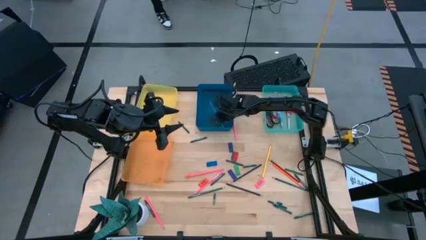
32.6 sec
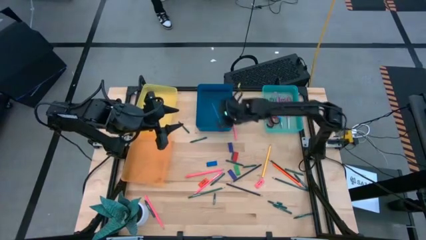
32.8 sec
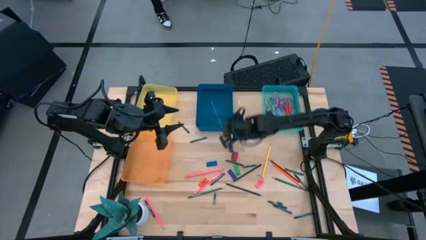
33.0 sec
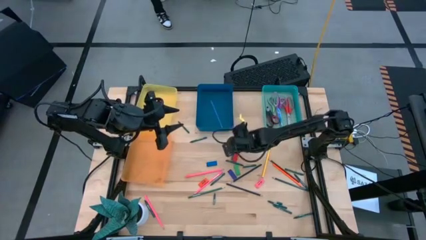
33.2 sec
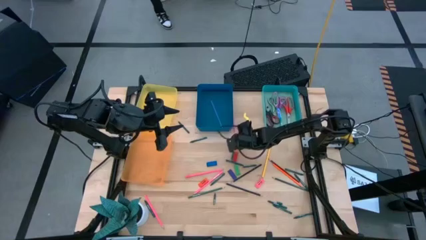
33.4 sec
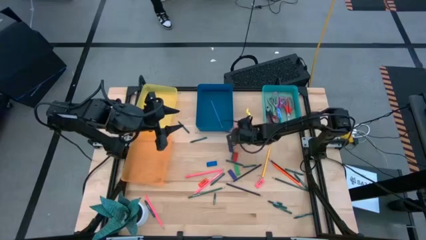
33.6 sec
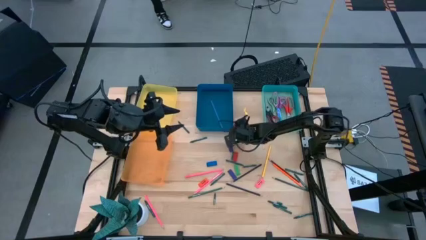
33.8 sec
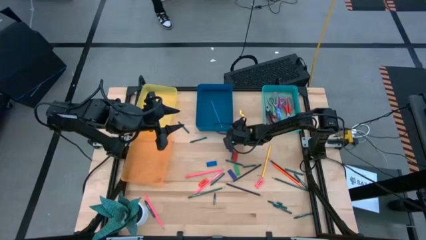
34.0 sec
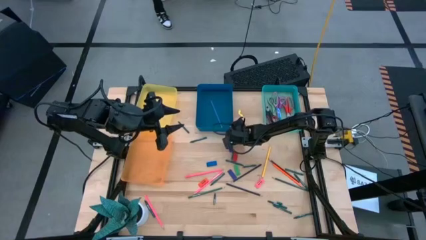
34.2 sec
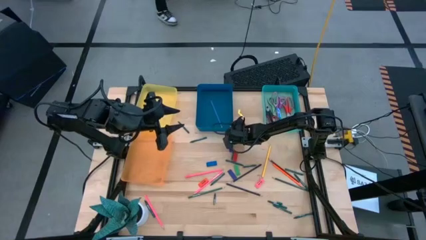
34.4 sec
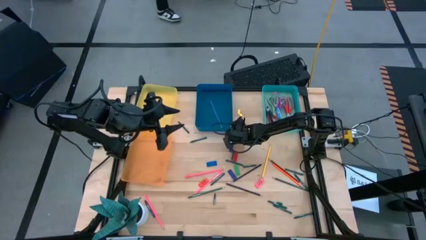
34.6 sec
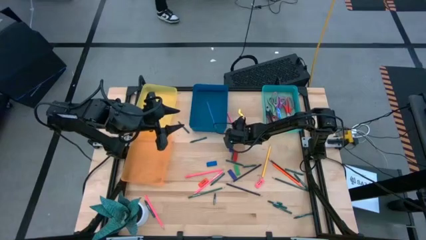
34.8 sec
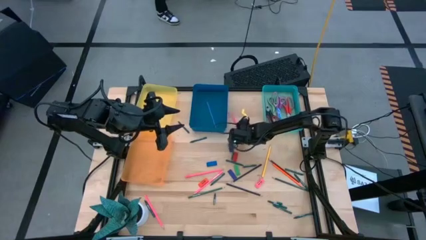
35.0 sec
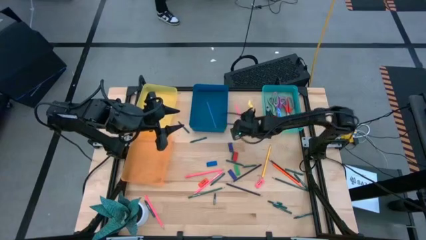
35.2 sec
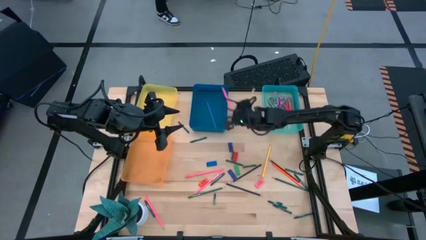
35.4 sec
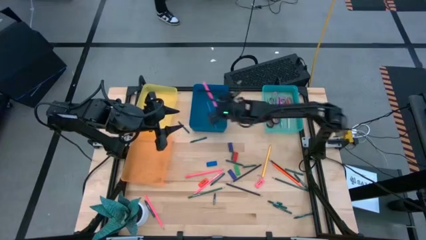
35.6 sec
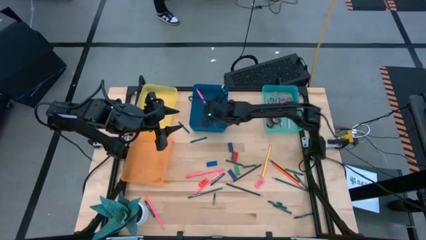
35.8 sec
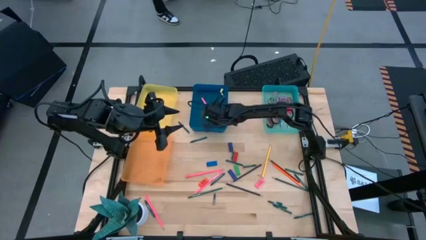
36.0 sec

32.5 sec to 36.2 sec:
Task: Sort crayons/erasers/pens/pencils in bins
Put the top pink pencil into the blue bin

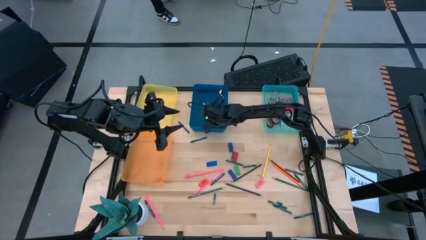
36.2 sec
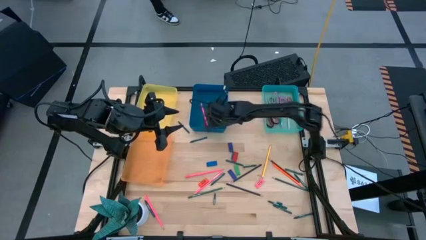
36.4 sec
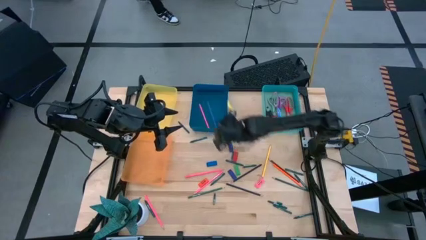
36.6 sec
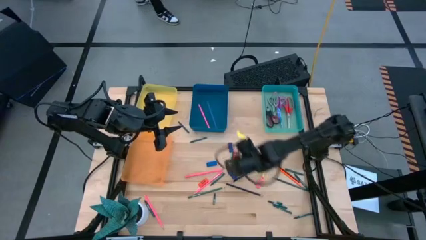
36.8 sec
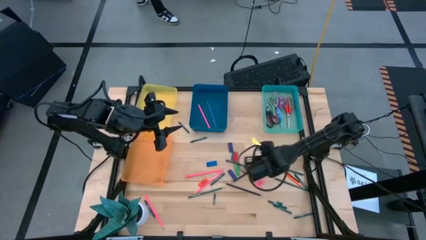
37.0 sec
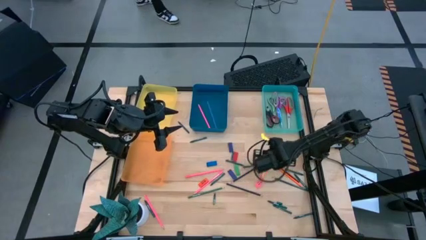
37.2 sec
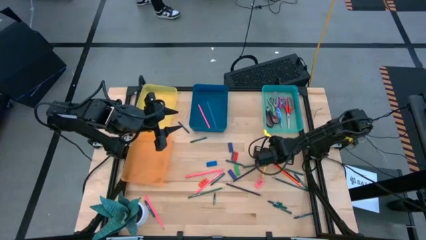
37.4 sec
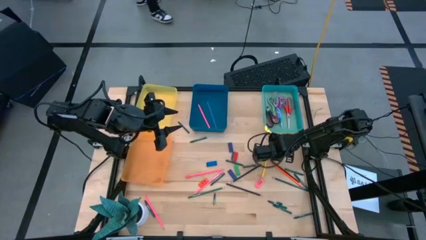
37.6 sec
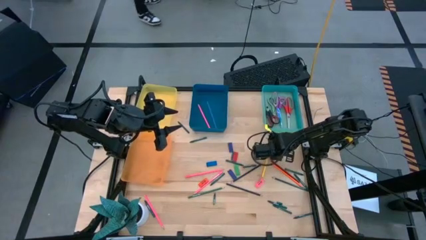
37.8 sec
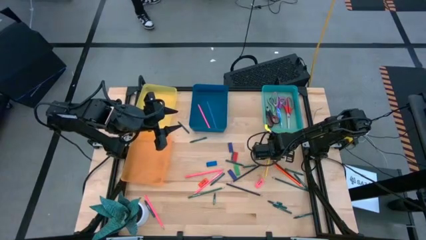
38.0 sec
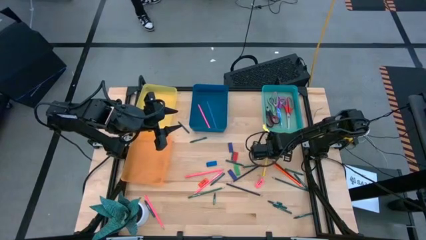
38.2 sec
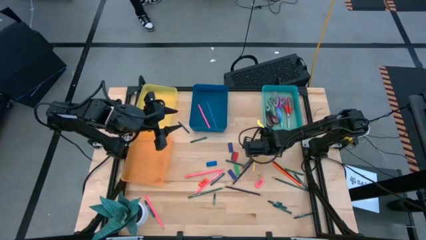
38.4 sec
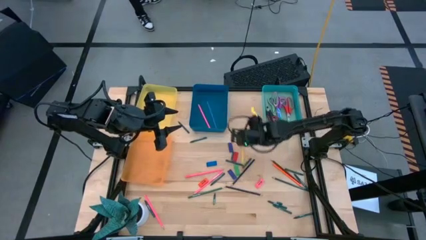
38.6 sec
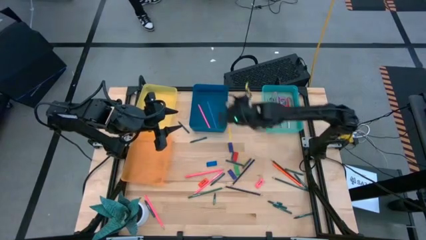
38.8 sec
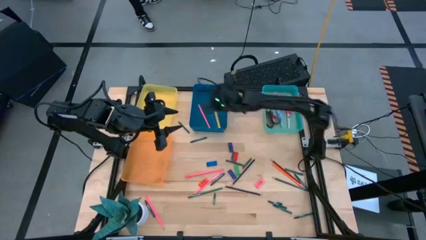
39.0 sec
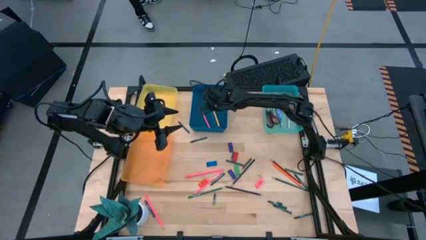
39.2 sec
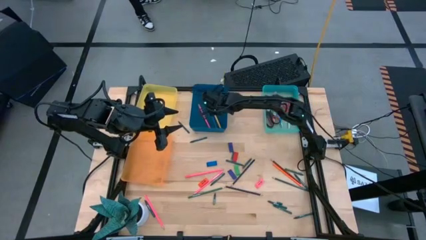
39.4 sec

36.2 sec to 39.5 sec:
Put the yellow pencil into the blue bin

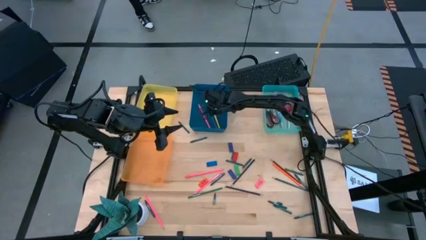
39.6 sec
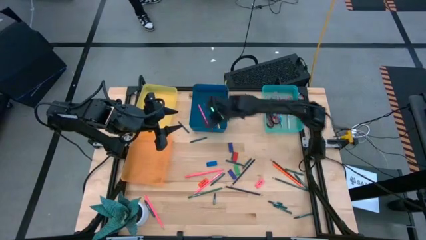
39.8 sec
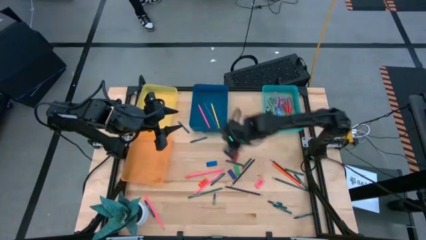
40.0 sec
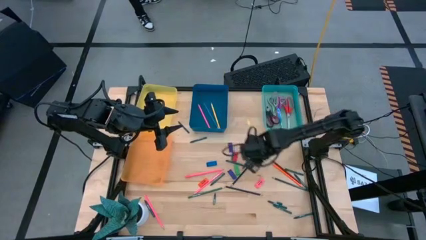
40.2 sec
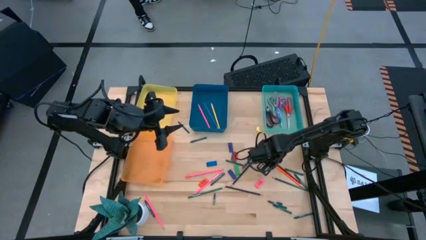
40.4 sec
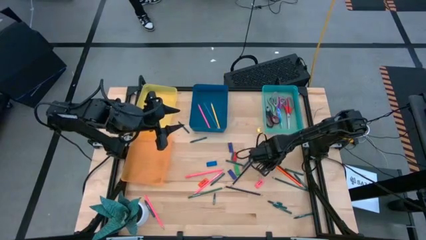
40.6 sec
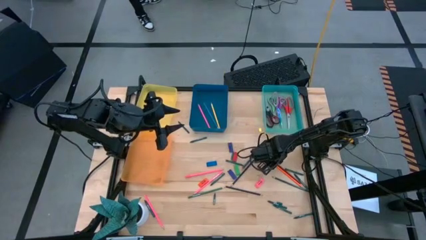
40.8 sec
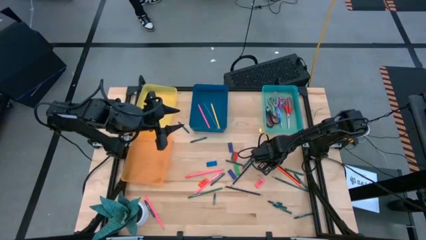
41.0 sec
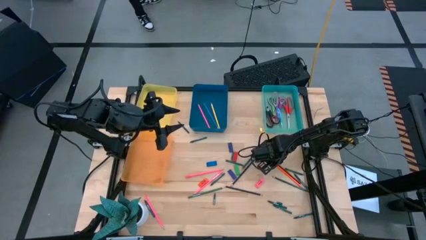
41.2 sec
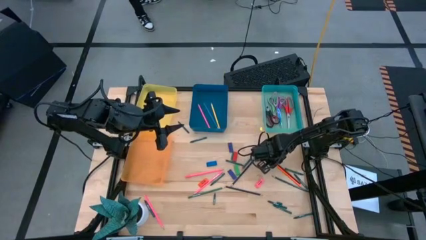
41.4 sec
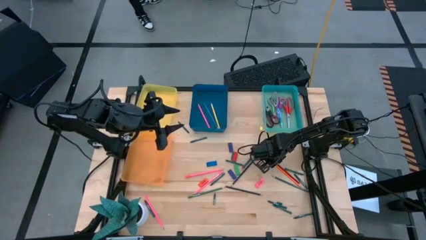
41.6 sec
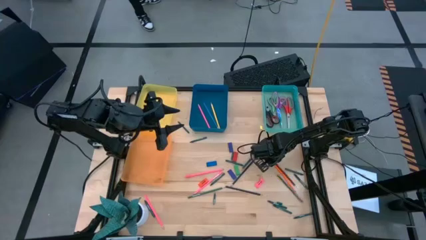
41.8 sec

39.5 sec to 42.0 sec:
Put the brown pencil into the blue bin

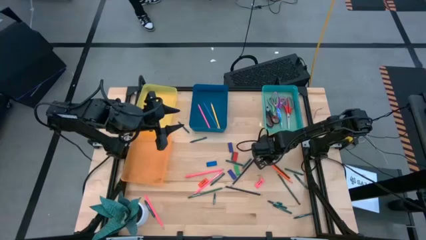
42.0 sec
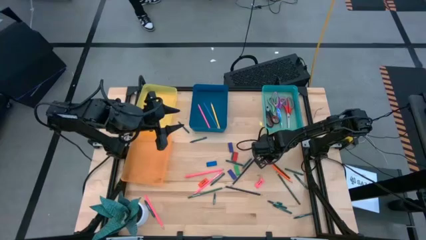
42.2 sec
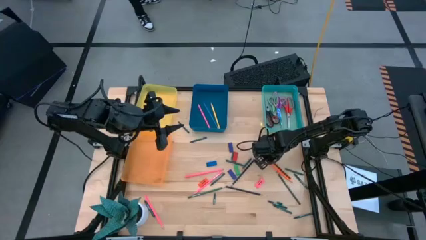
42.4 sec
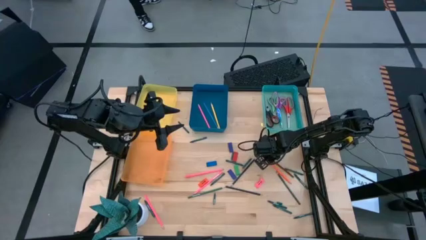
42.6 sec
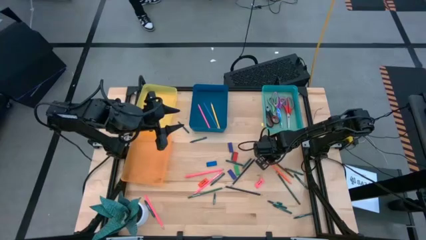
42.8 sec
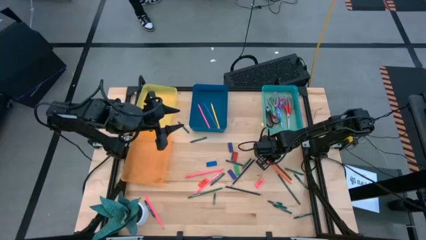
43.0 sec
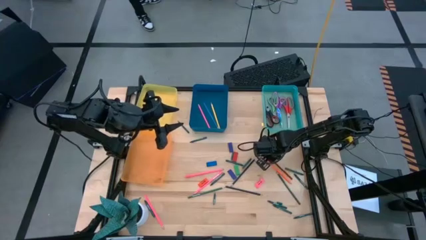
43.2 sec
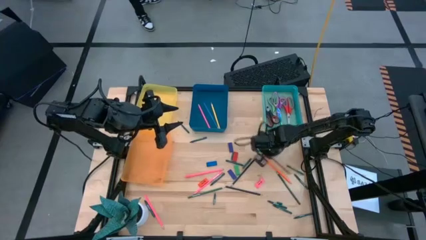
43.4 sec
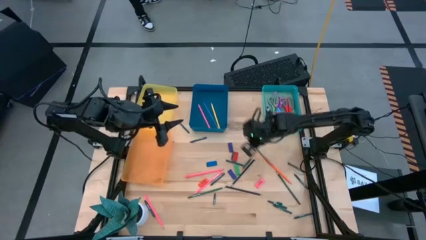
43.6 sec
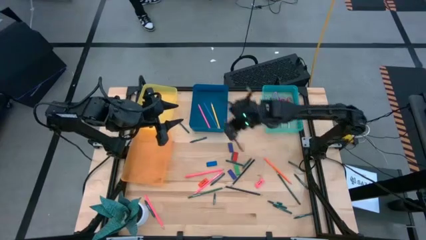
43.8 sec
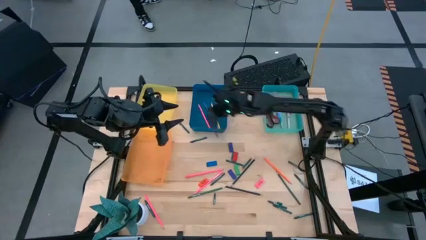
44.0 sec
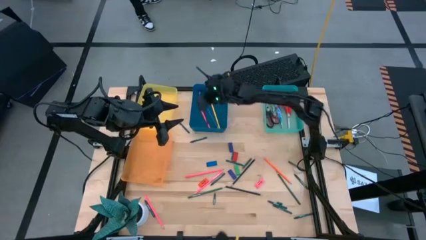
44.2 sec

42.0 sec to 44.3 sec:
Put the brown pencil into the blue bin

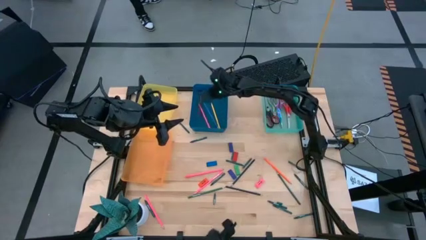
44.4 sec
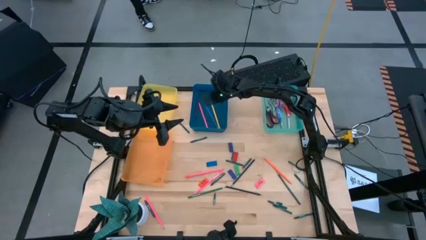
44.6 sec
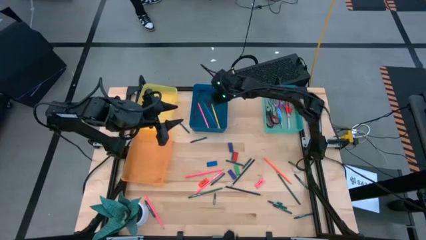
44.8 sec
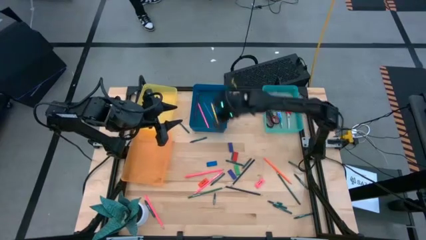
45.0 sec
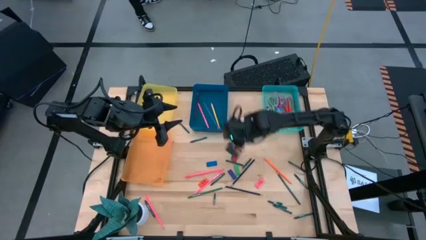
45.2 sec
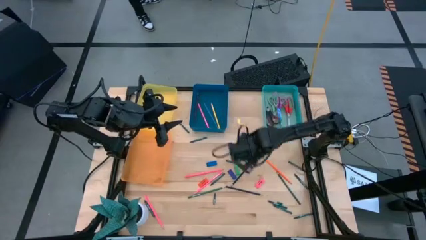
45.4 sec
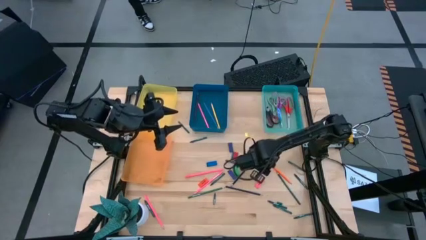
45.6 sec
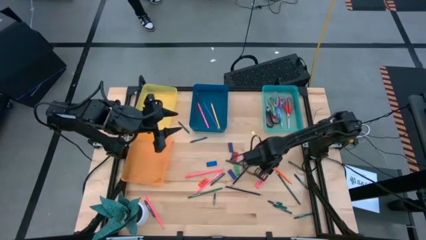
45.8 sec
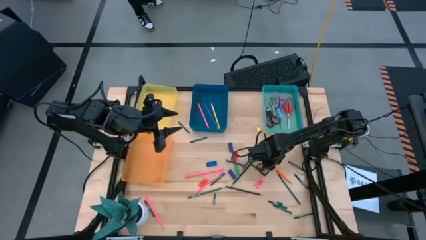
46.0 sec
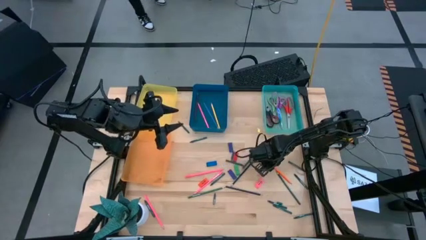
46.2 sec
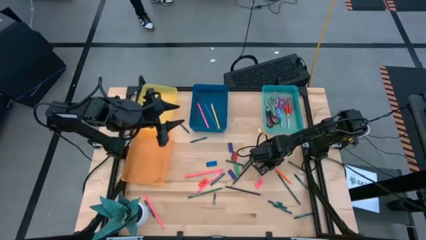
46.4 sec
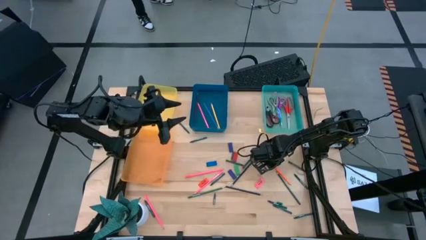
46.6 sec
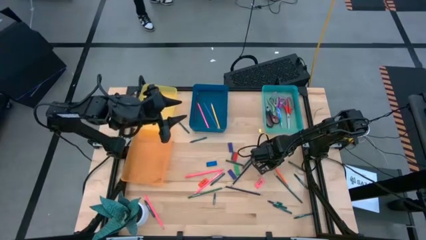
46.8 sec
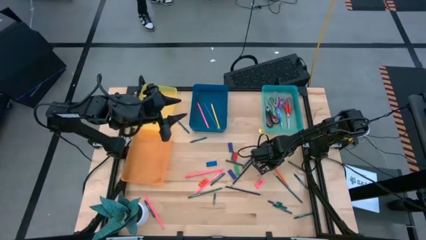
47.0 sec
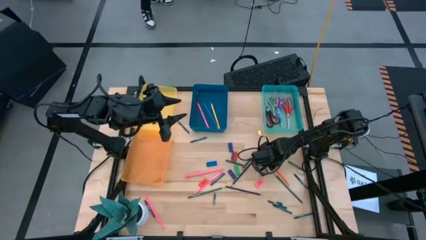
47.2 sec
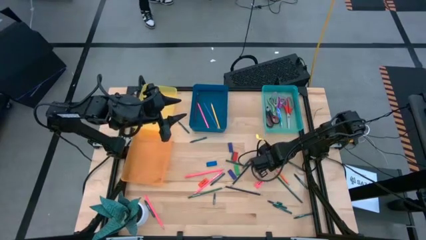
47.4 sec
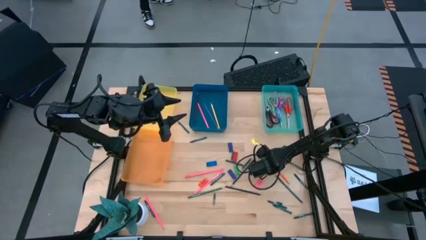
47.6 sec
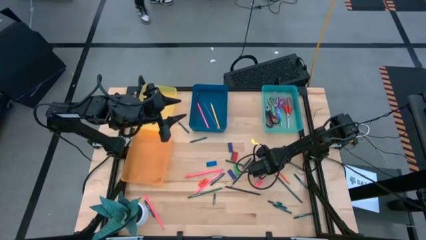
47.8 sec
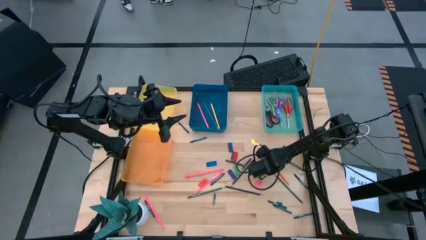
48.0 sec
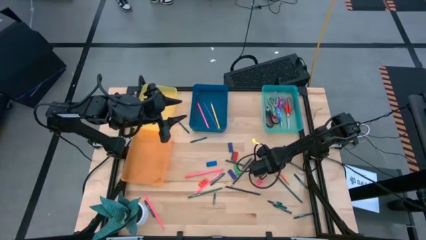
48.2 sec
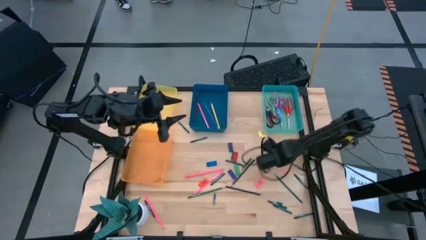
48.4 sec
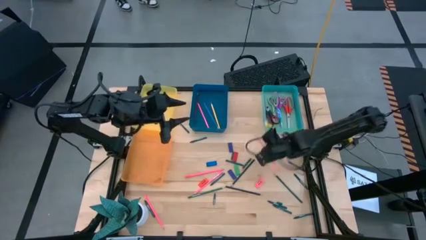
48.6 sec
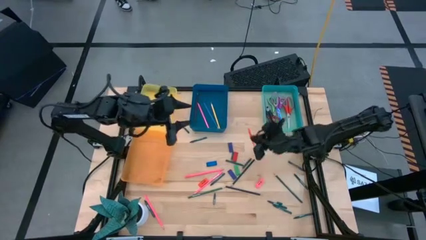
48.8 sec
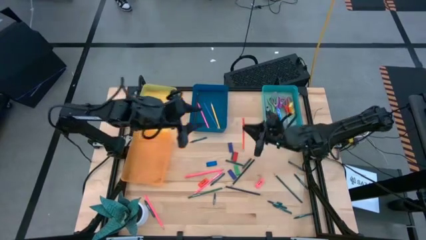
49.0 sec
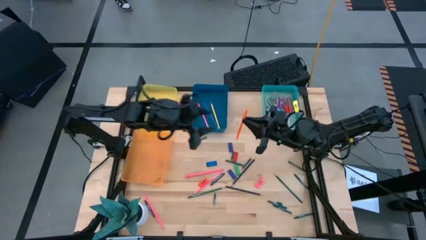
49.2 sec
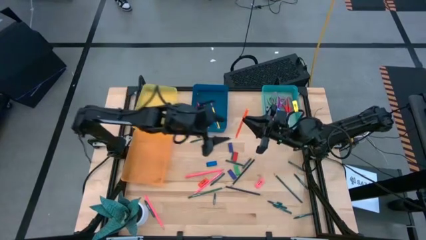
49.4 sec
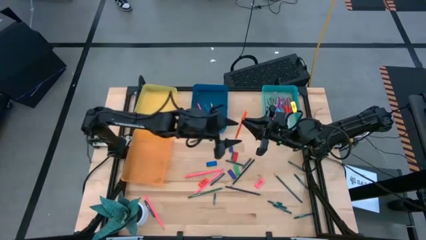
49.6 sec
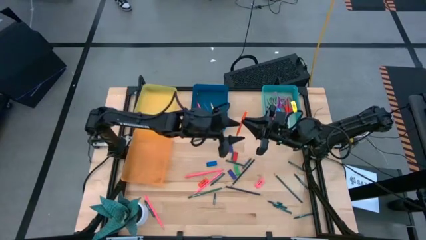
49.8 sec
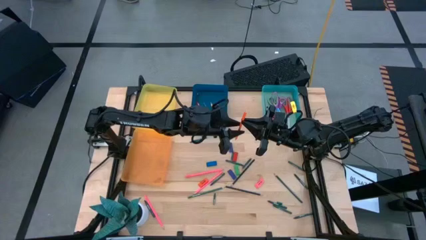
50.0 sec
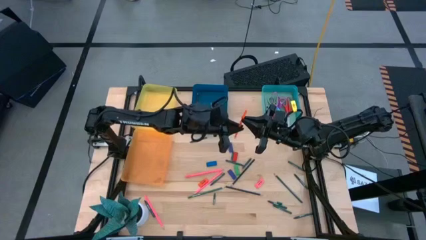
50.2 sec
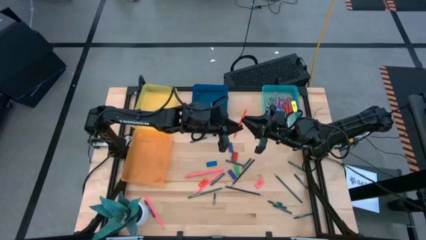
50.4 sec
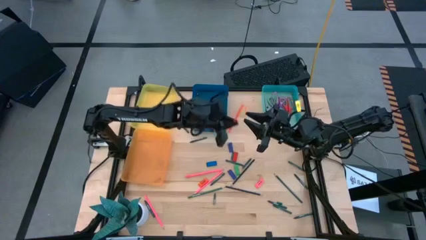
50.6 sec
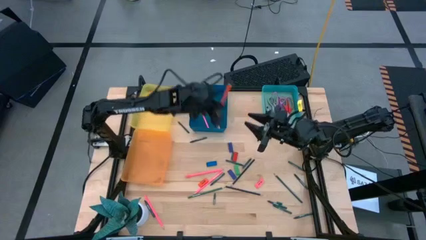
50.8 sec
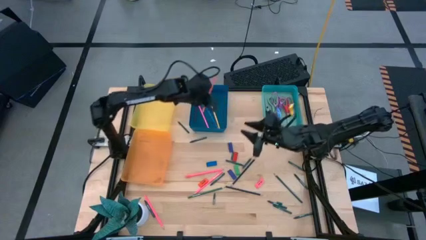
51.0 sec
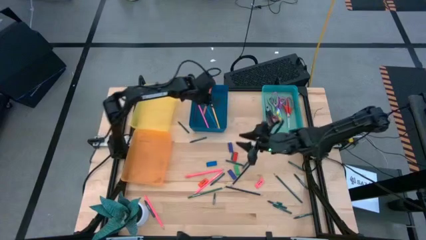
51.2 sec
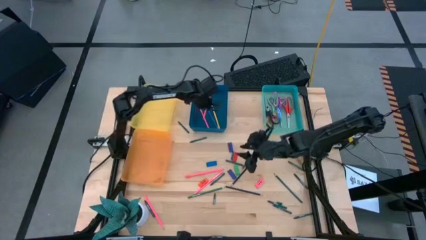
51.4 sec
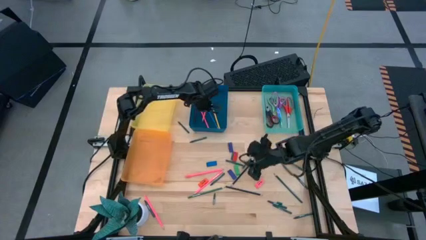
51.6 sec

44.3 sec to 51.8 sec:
Put the orange pencil into the blue bin
